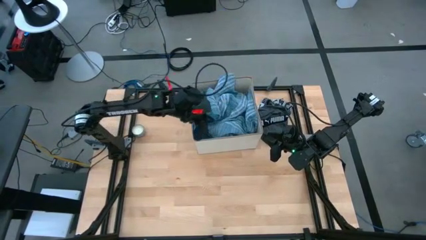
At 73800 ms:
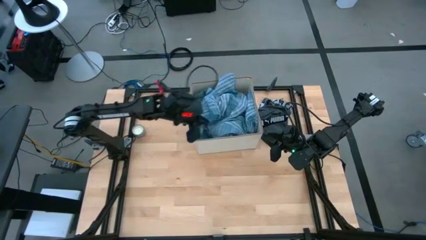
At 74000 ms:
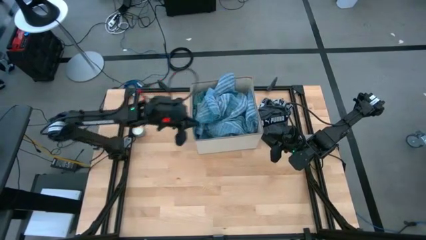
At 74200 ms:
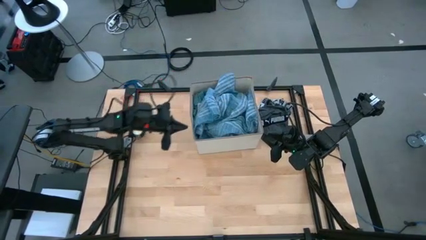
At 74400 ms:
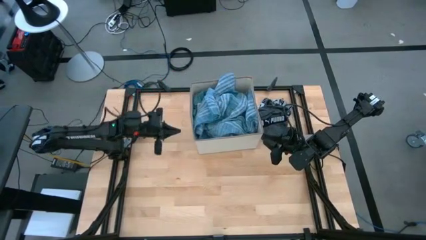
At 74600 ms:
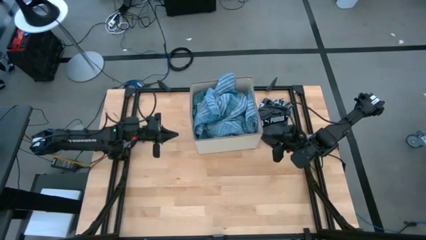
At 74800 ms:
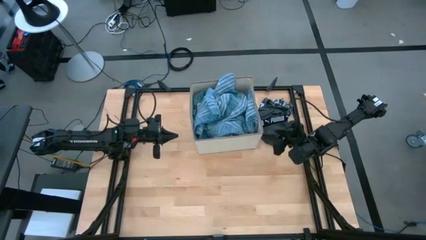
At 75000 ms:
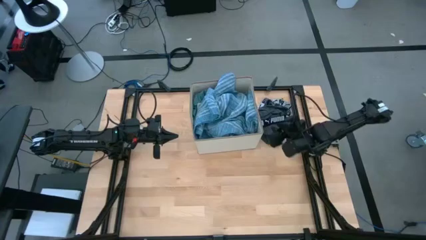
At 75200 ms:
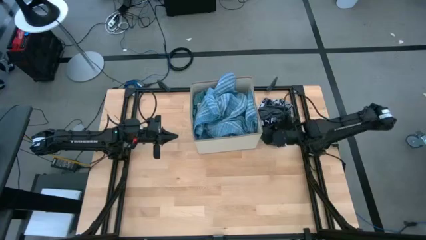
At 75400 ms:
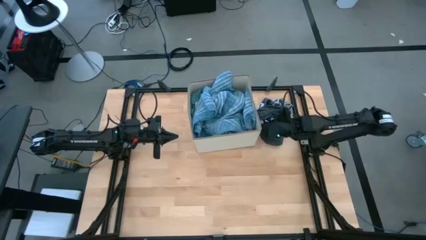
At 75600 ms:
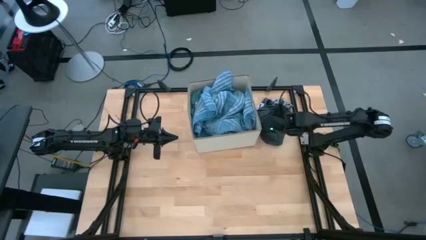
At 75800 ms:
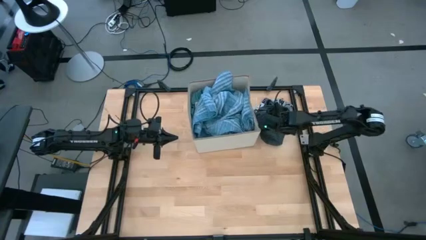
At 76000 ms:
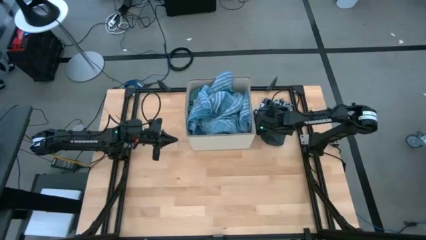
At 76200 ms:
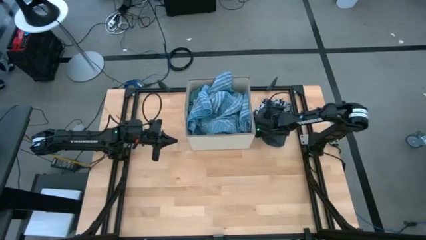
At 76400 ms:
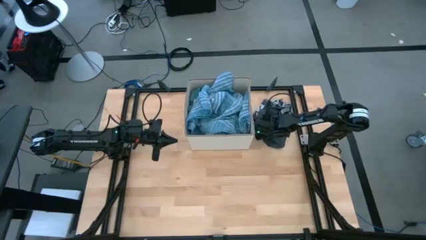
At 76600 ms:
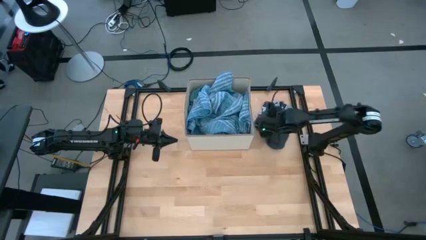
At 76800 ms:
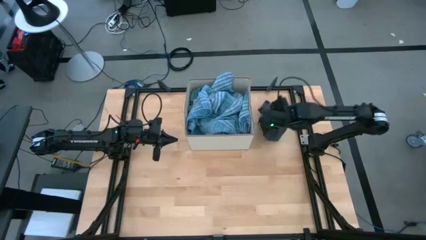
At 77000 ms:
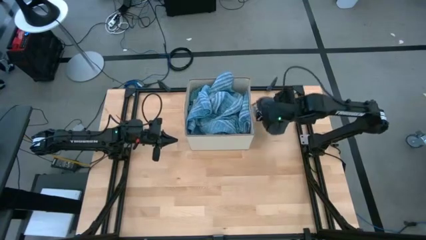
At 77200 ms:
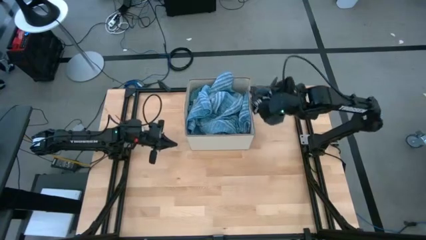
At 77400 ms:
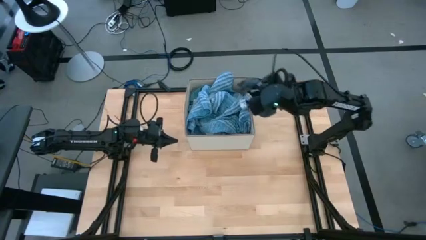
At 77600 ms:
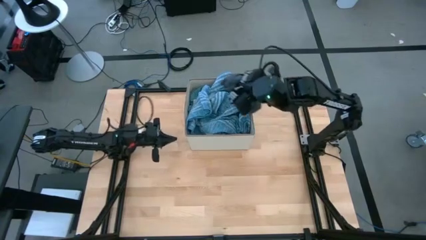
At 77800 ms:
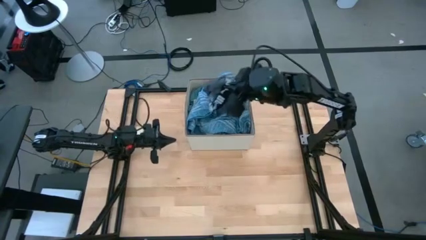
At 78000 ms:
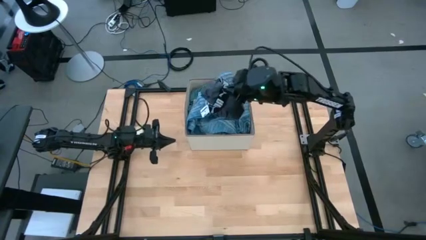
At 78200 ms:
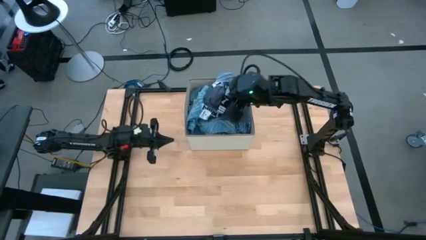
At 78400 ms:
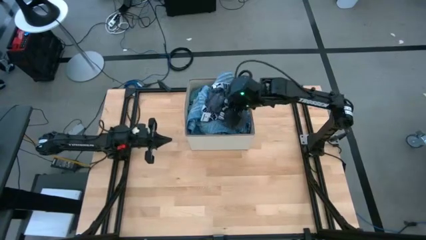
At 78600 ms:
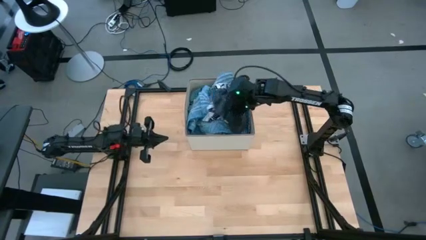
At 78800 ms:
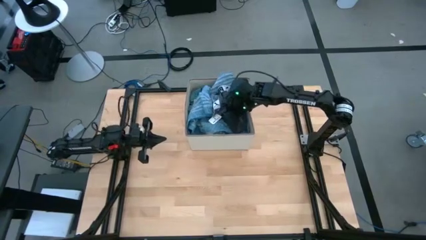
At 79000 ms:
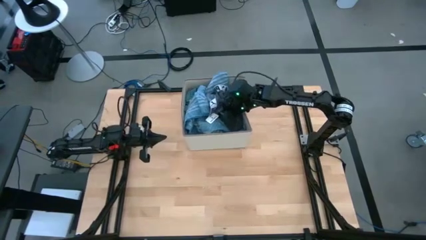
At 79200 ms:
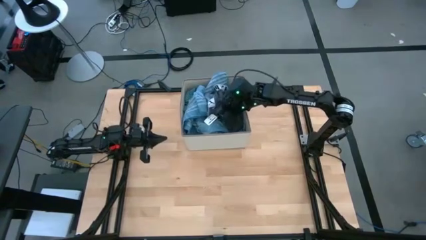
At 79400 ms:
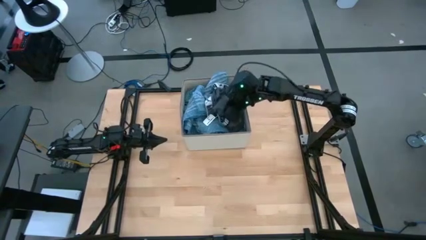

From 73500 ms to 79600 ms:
Task: Sort clothes
Put the gray boxer into the bin

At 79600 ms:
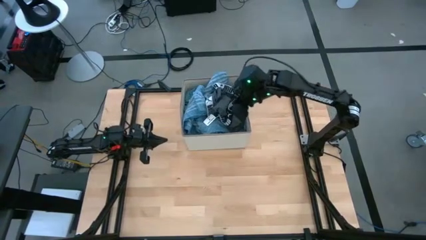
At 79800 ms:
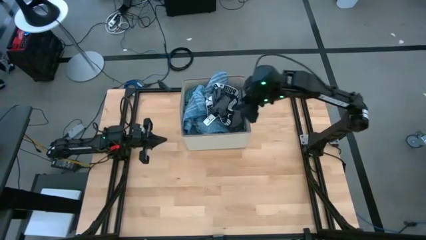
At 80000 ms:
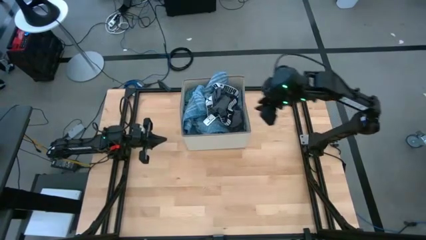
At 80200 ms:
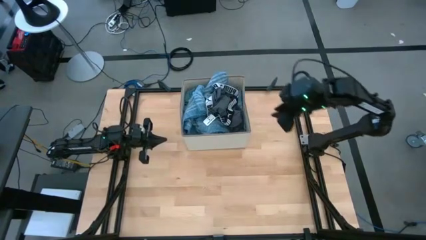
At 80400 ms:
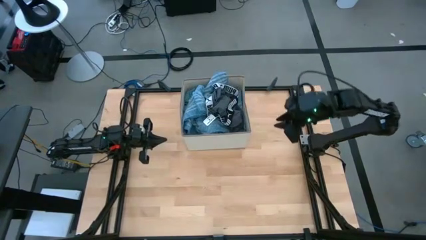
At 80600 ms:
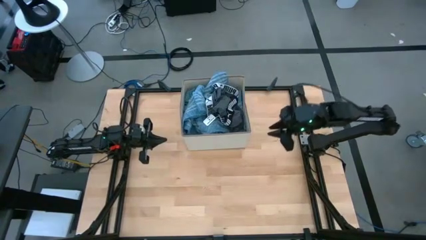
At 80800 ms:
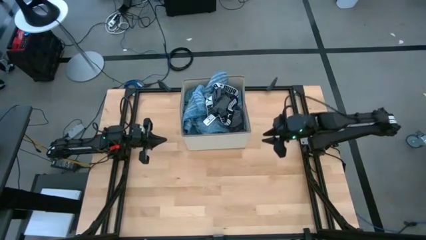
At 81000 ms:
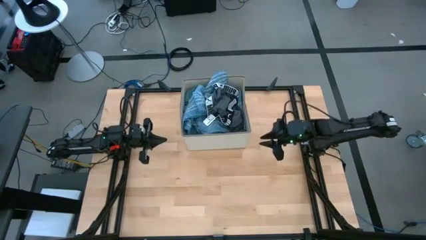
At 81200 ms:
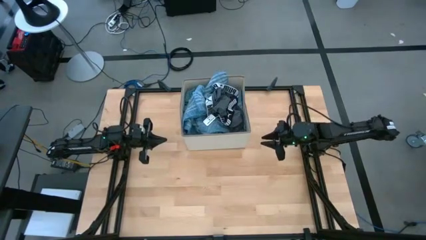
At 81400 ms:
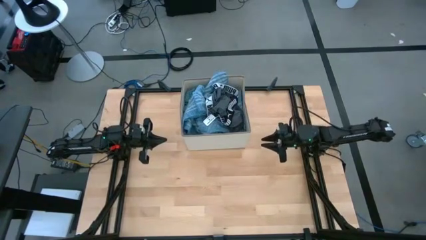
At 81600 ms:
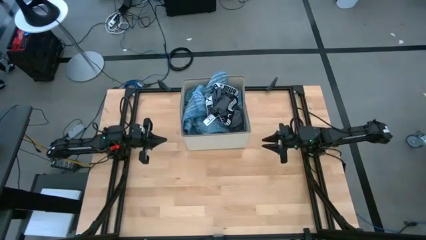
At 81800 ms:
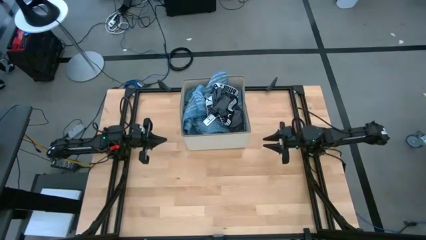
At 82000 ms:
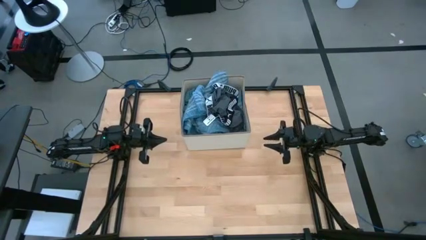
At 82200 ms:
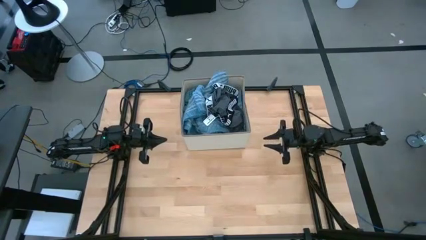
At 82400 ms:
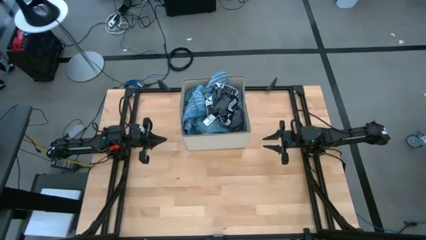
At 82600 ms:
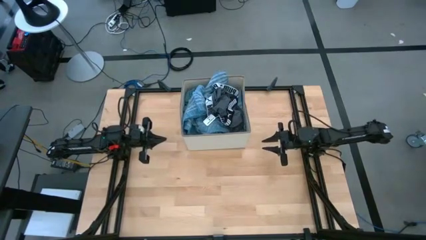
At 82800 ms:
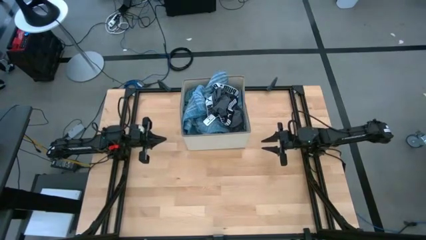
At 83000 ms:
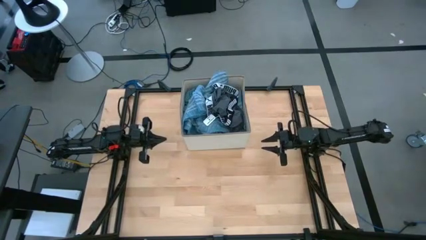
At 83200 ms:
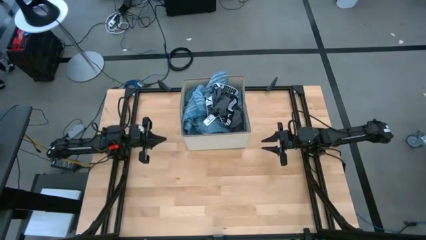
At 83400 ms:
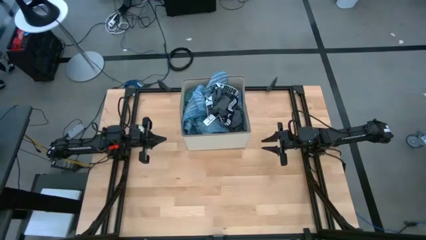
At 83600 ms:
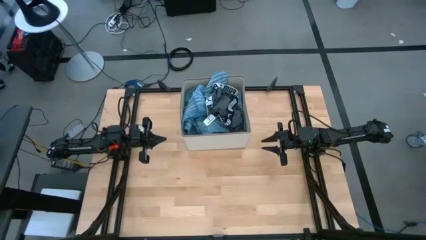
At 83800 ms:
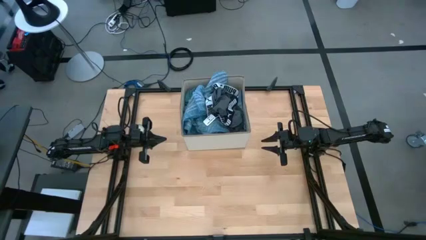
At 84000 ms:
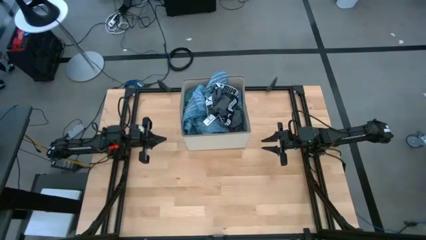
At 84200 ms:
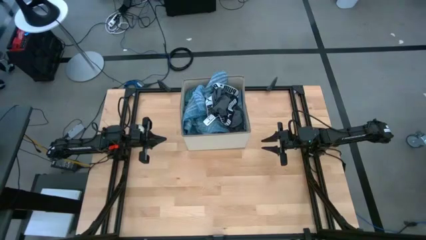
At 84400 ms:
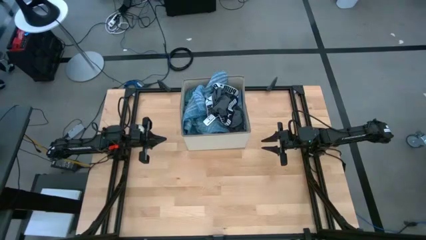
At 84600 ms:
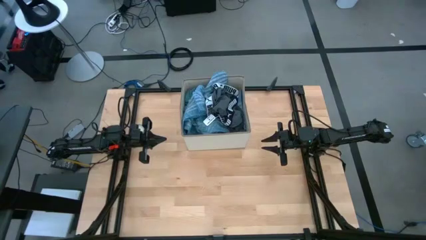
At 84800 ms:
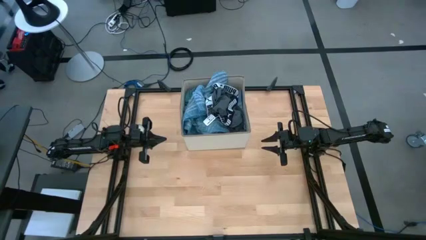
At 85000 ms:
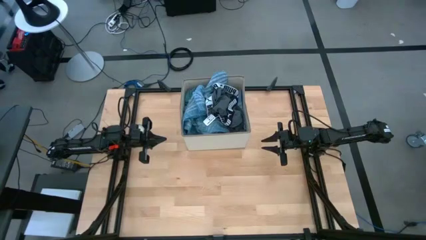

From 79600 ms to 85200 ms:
Return to Home Position
